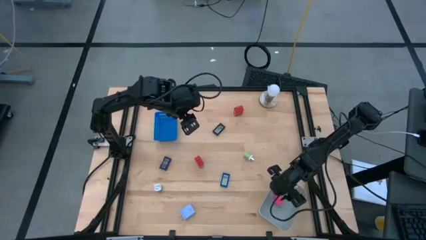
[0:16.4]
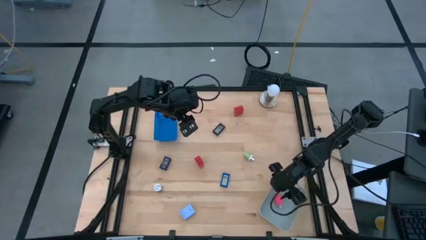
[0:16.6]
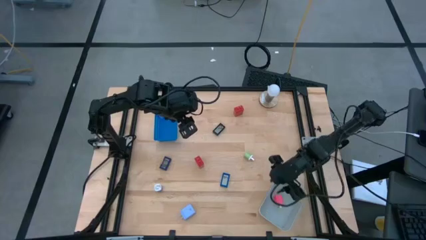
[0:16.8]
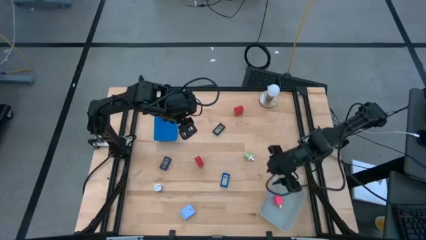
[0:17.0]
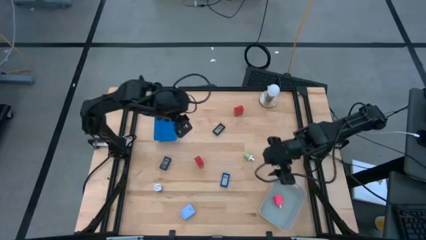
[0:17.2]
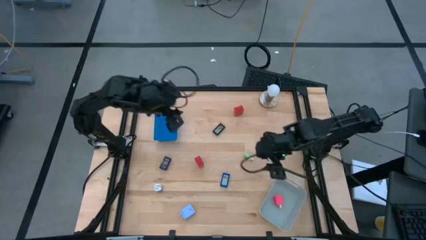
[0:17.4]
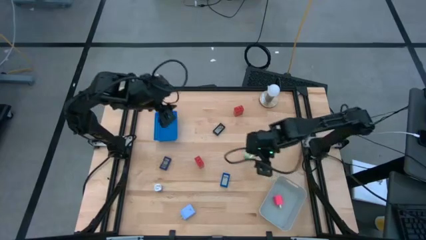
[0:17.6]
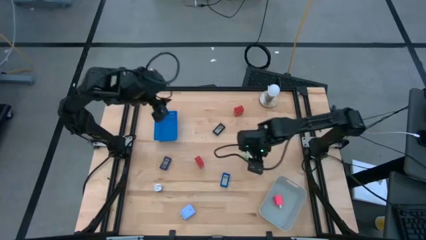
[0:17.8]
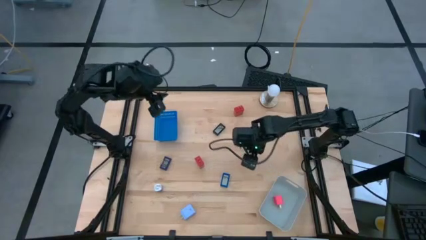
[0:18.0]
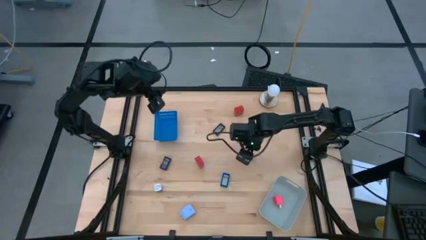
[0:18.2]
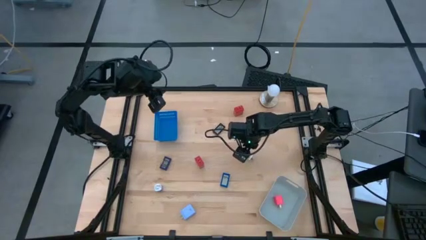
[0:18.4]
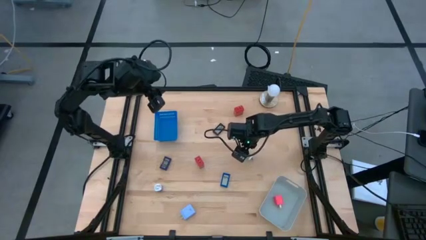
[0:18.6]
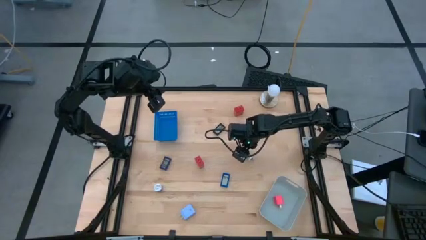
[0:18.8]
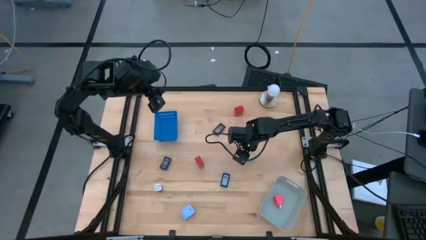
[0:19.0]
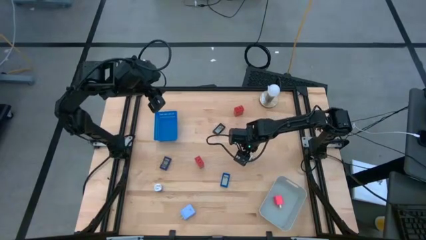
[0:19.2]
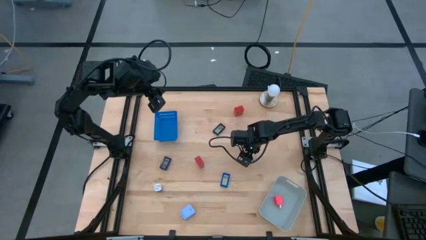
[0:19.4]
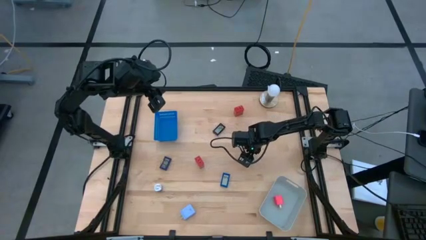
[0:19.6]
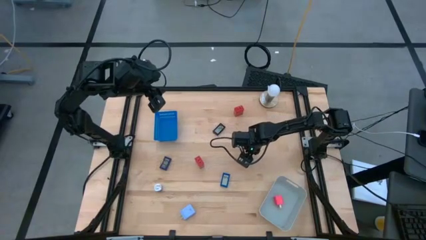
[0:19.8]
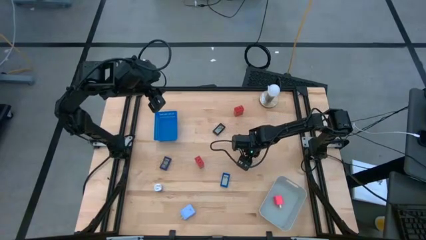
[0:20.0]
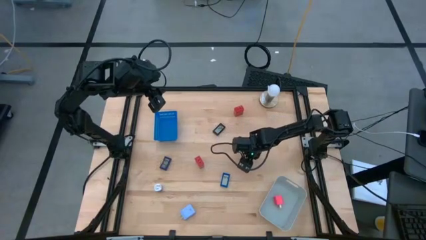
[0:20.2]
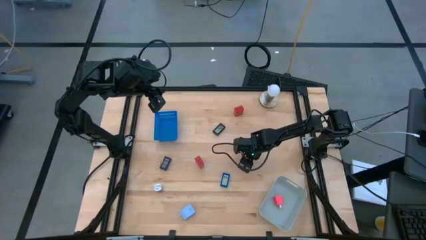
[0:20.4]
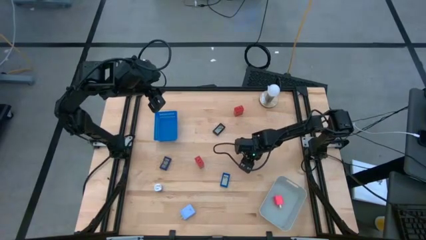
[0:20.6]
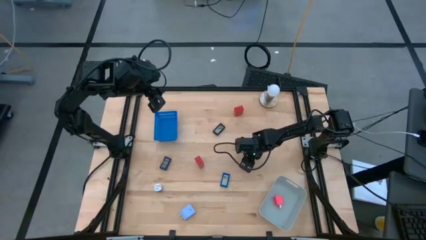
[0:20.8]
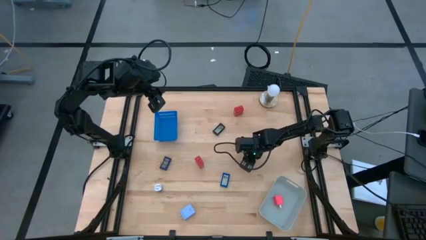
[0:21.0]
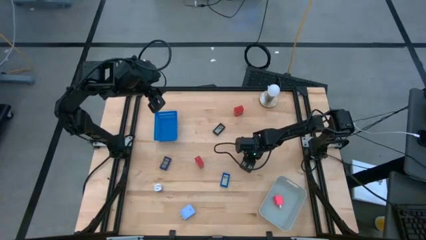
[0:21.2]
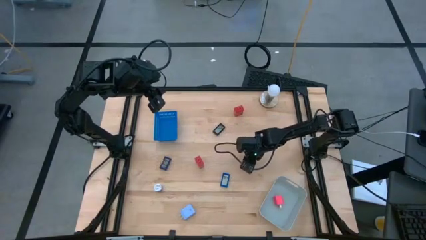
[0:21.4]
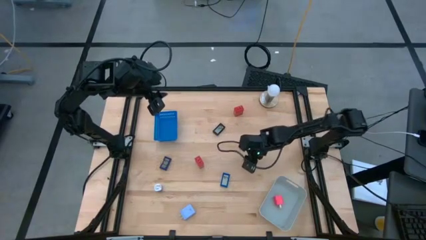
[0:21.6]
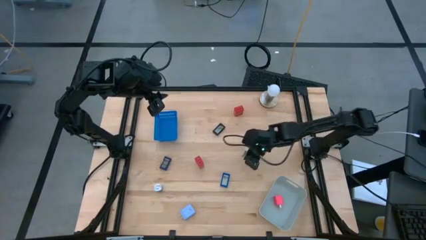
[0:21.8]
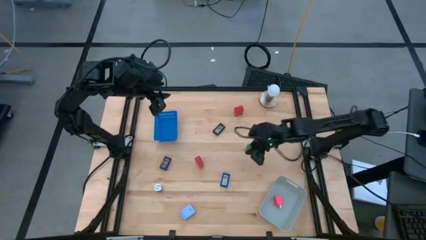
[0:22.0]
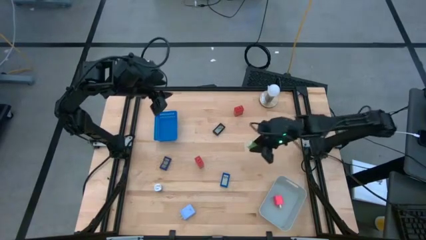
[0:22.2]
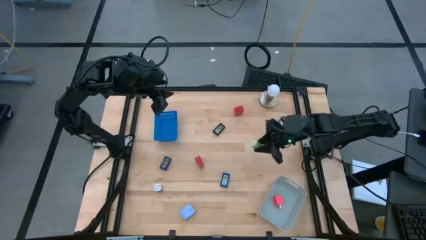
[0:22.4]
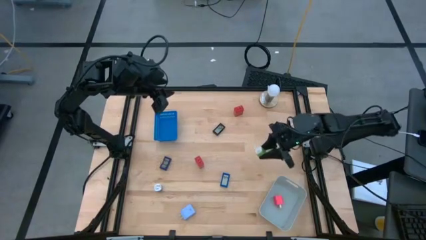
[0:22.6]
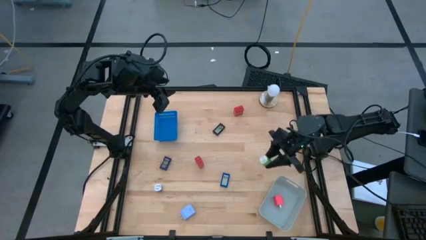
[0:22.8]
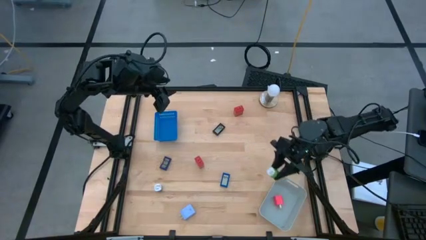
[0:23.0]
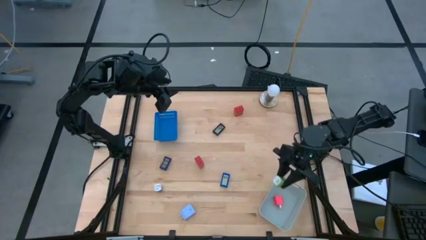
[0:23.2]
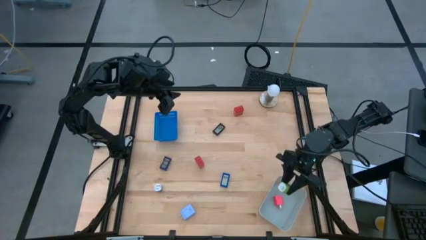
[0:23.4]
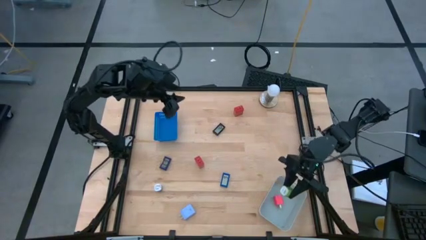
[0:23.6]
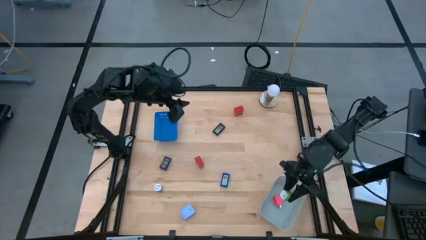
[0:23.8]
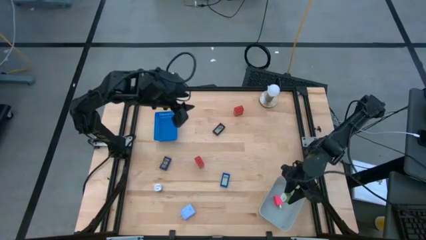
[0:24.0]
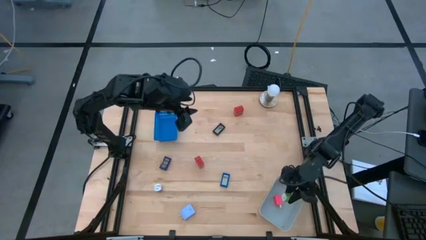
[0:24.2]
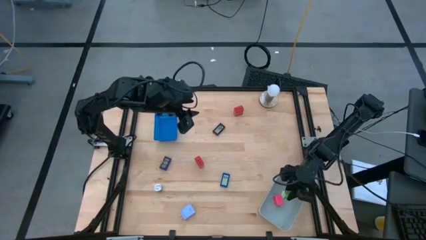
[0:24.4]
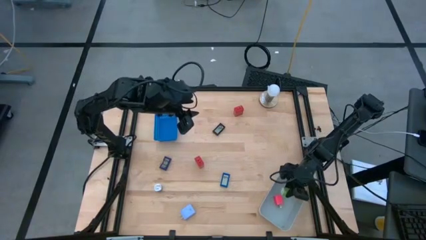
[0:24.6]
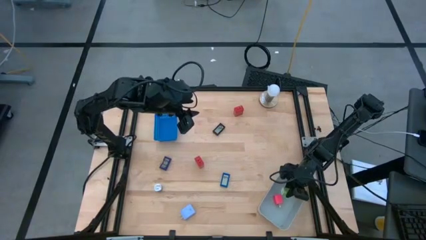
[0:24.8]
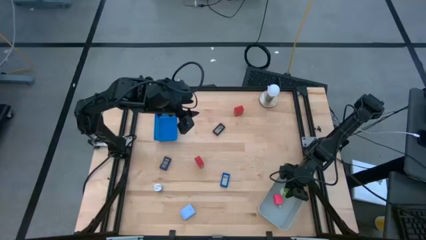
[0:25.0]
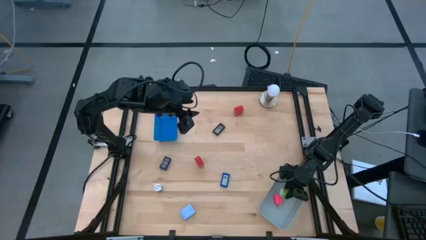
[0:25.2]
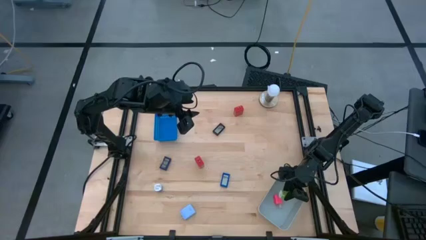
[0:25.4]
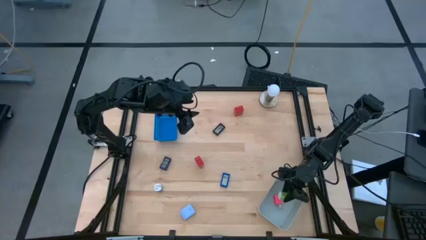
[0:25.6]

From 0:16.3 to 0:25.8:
Task: Pick & Place Office items
Put the green charger adapter into the white bin

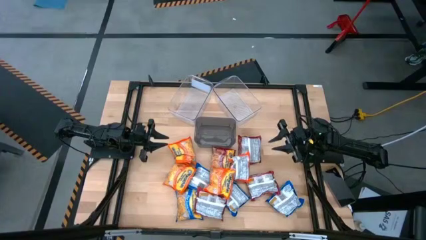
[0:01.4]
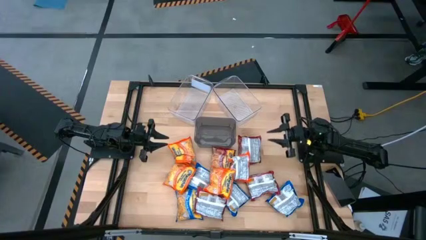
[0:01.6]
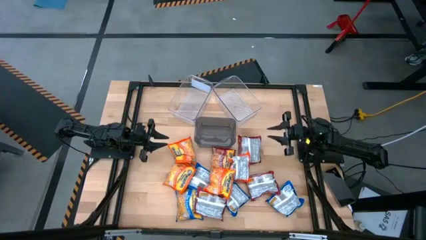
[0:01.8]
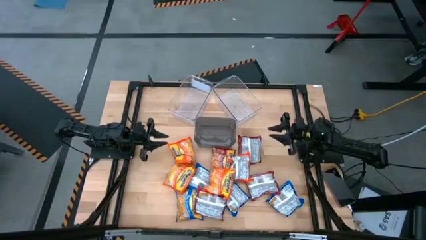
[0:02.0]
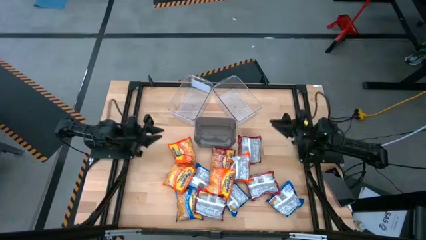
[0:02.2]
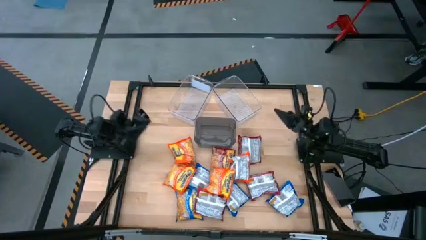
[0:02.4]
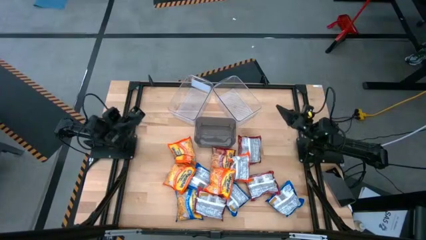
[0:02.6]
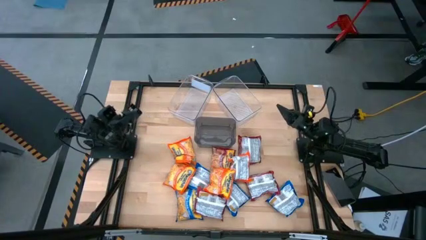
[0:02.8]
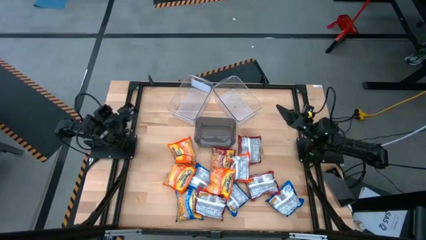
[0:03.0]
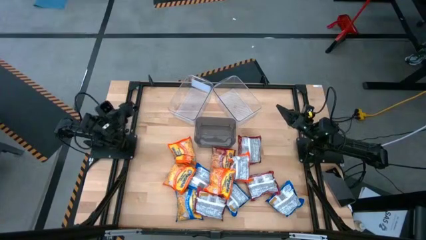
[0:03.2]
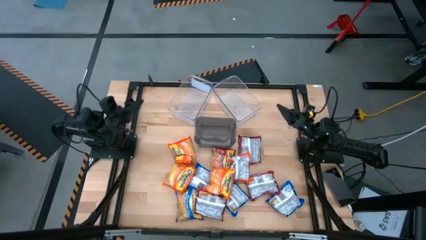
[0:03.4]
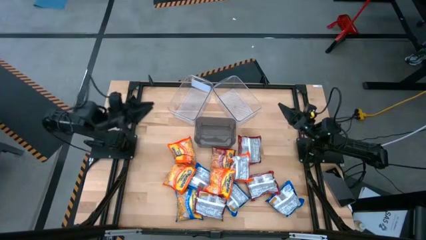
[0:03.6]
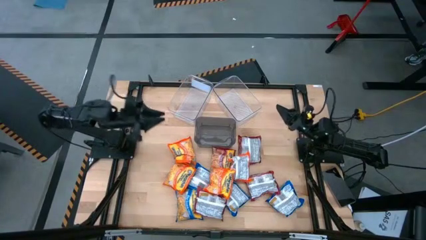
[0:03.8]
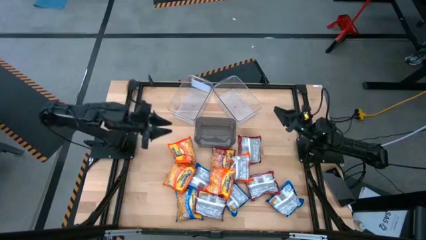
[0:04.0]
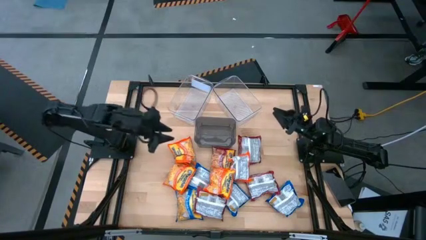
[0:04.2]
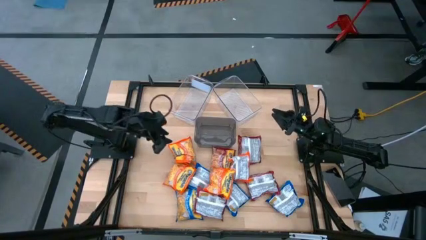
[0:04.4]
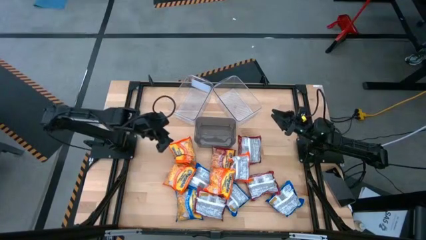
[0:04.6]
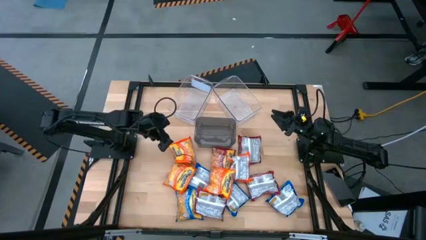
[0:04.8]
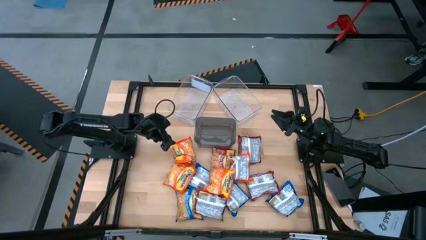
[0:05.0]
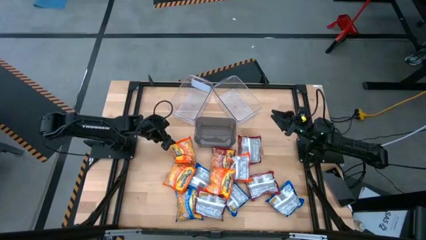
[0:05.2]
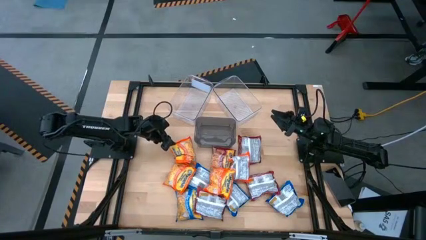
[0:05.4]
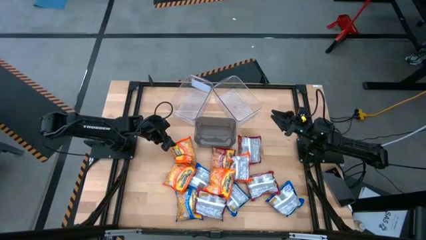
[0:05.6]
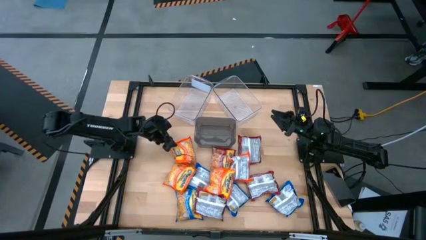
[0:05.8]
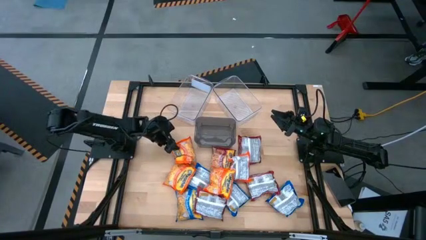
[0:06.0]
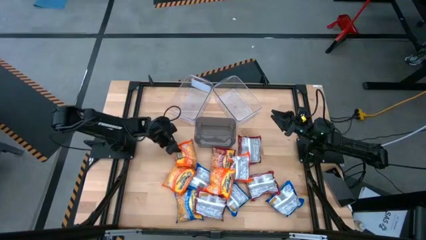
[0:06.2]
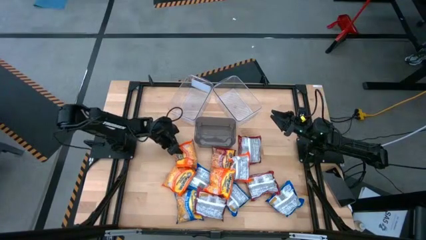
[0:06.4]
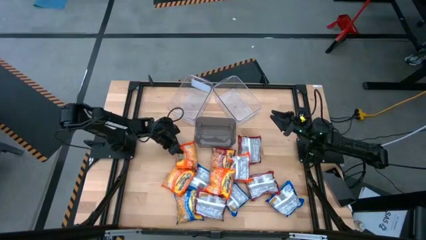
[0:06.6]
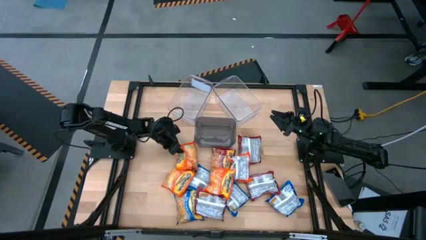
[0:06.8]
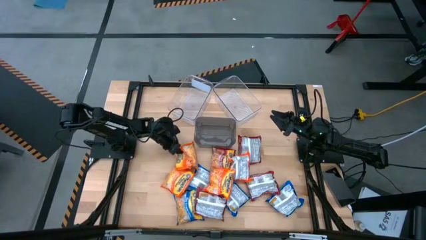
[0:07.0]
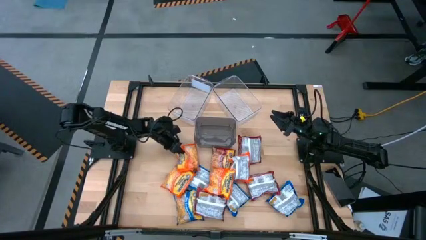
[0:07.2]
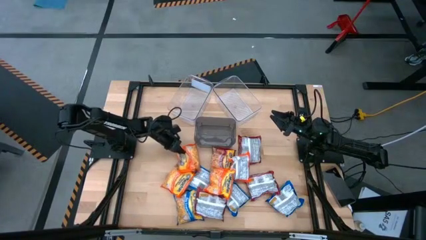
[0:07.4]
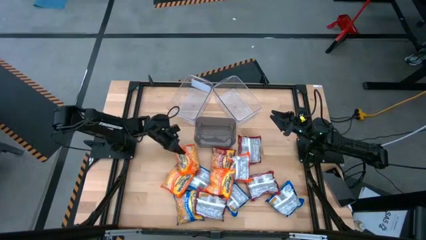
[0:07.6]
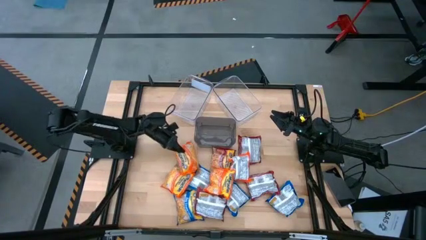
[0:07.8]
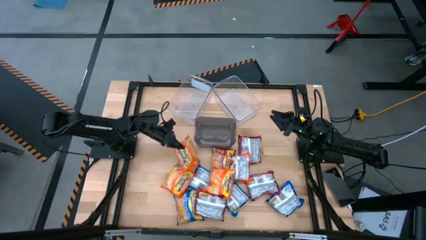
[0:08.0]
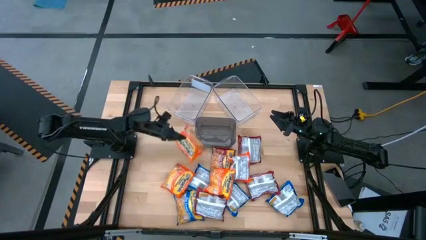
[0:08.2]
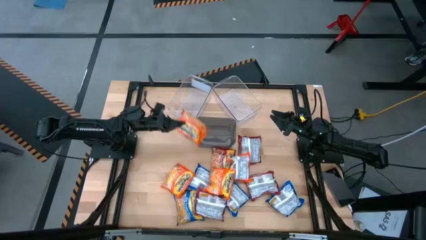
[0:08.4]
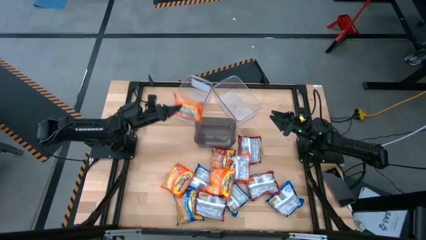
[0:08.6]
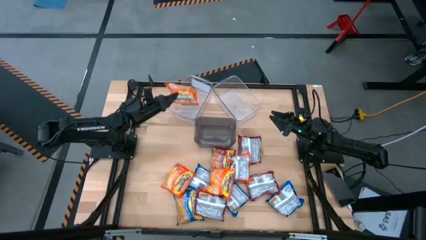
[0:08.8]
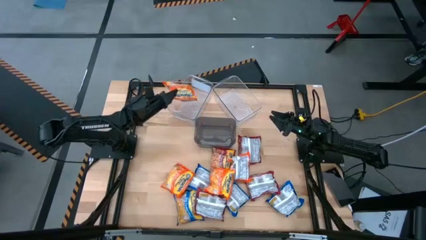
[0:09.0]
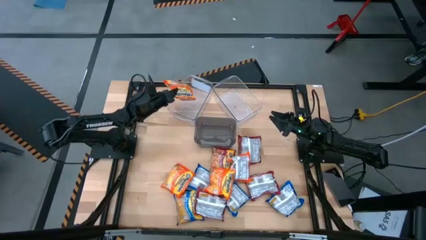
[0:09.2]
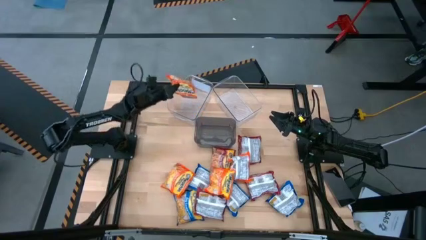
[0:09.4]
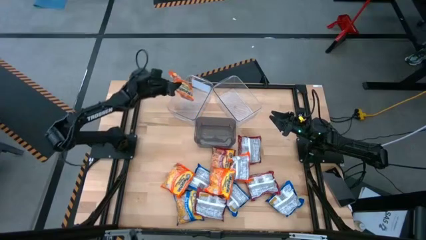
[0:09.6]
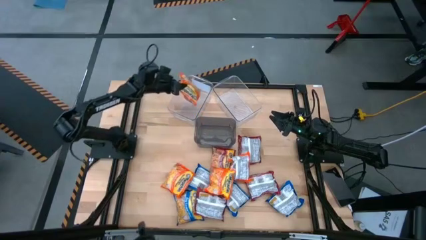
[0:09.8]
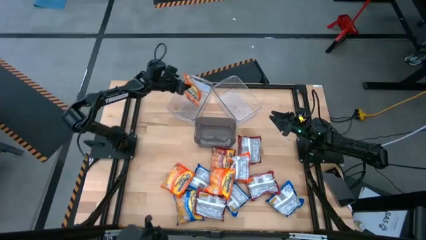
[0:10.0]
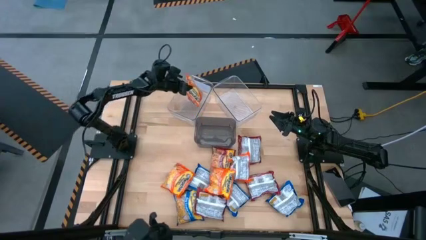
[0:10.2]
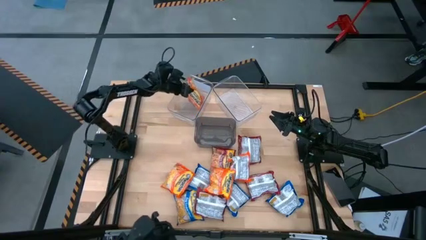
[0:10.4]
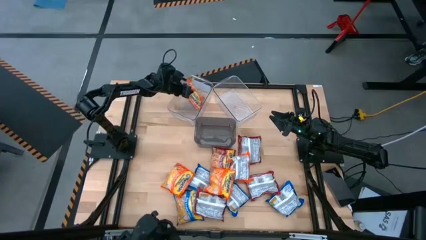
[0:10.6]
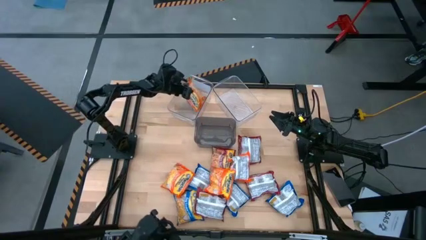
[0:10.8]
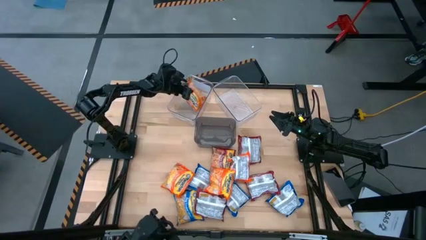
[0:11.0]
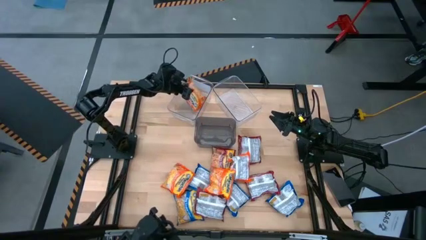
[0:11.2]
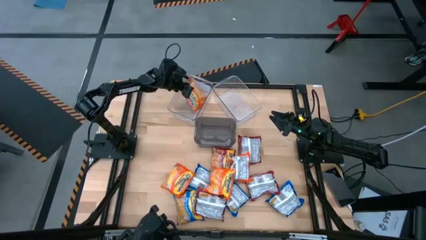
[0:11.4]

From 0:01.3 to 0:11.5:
Task: Sort Maruchan noodles
Put the orange noodle pack into the left transparent bin
